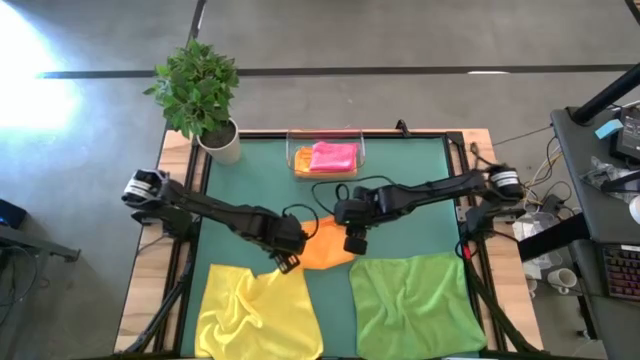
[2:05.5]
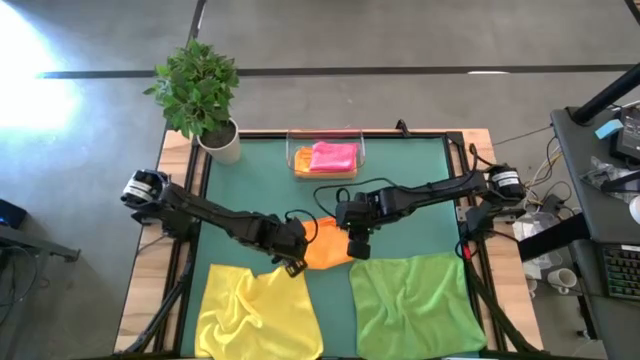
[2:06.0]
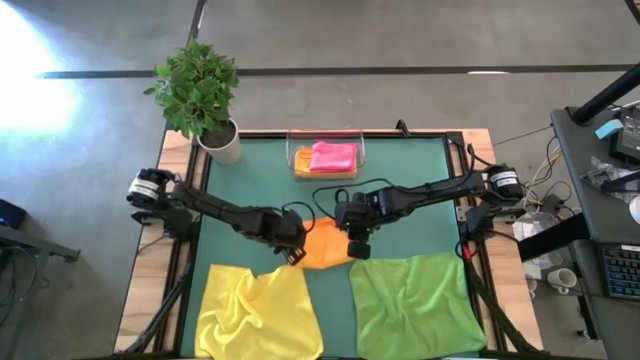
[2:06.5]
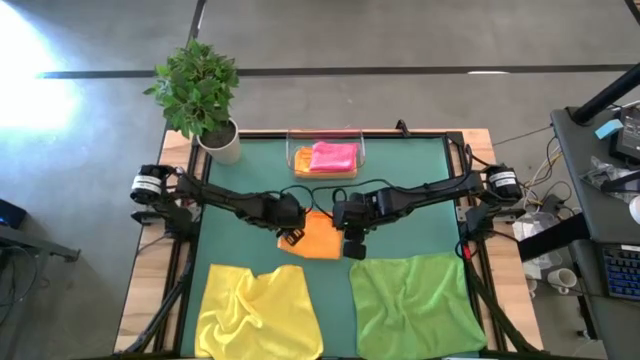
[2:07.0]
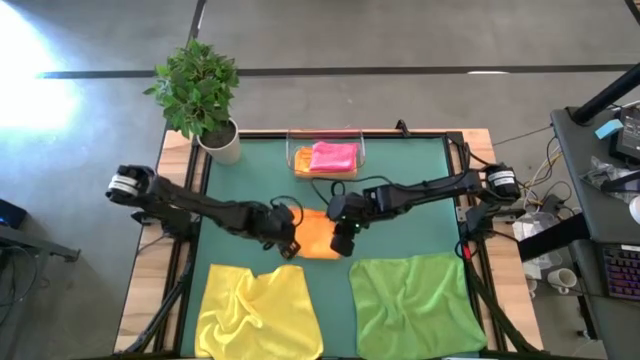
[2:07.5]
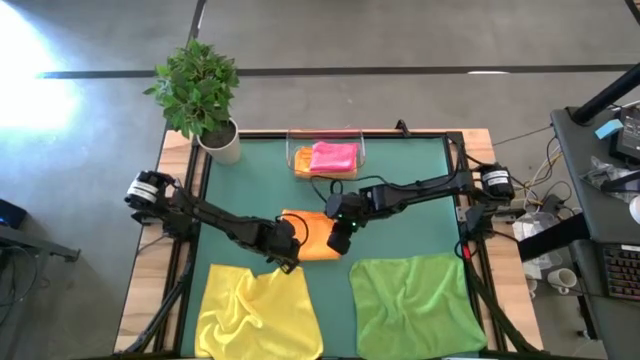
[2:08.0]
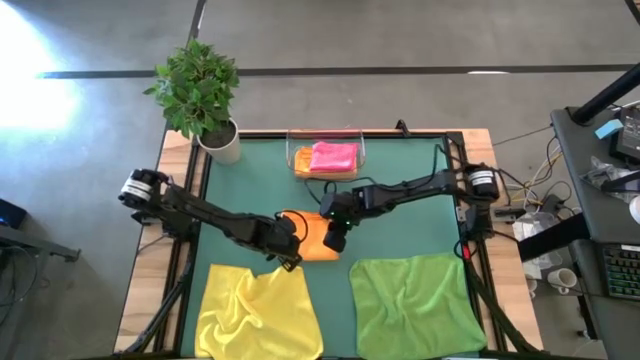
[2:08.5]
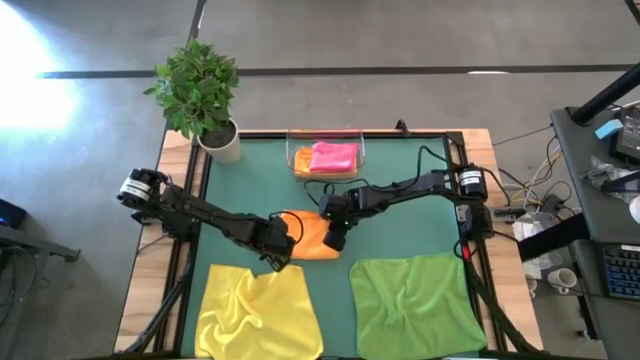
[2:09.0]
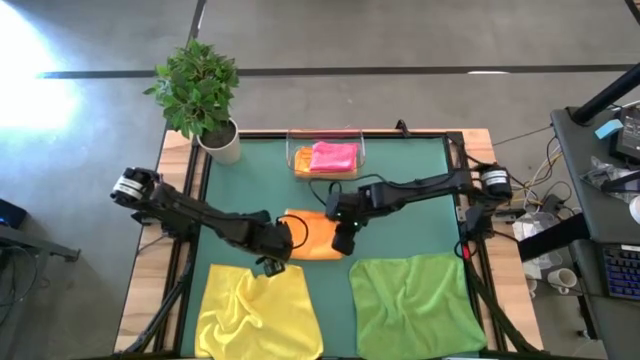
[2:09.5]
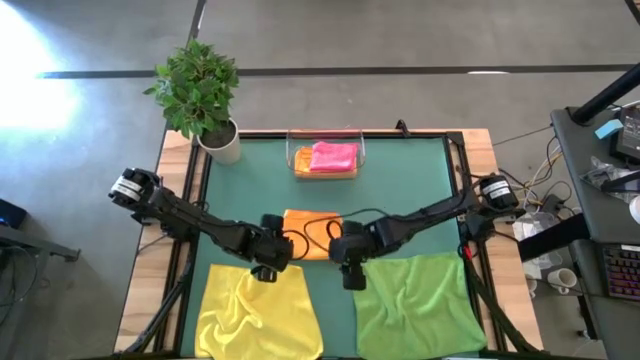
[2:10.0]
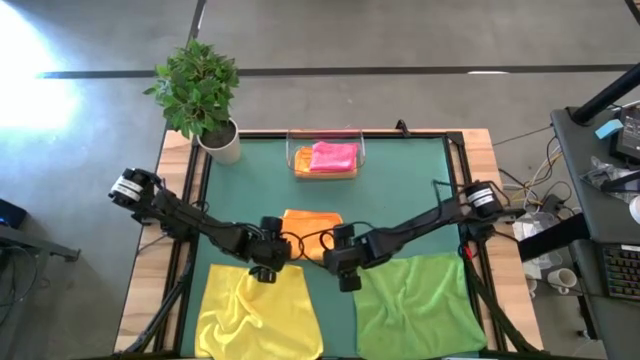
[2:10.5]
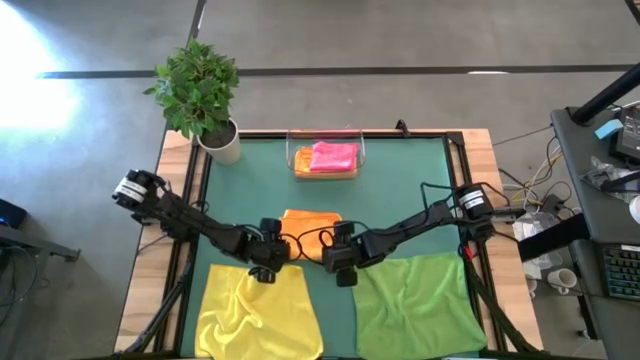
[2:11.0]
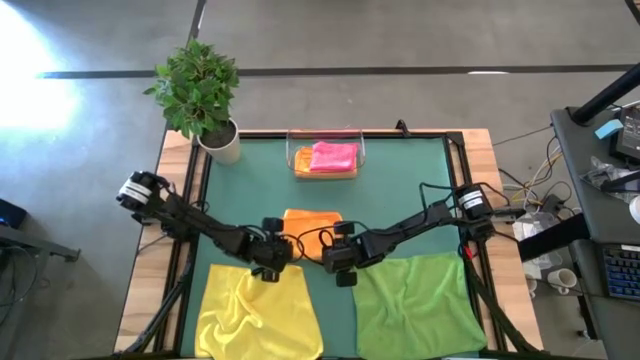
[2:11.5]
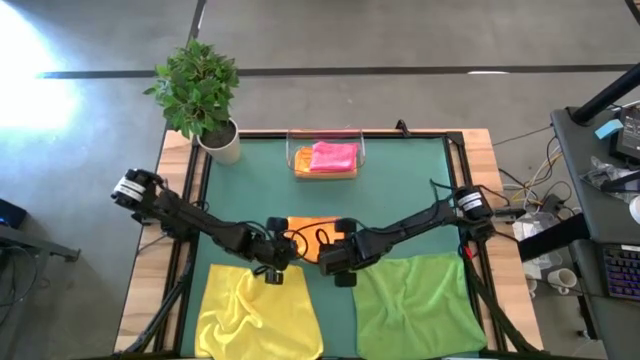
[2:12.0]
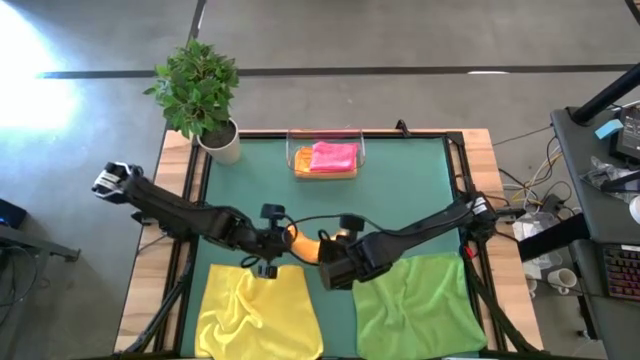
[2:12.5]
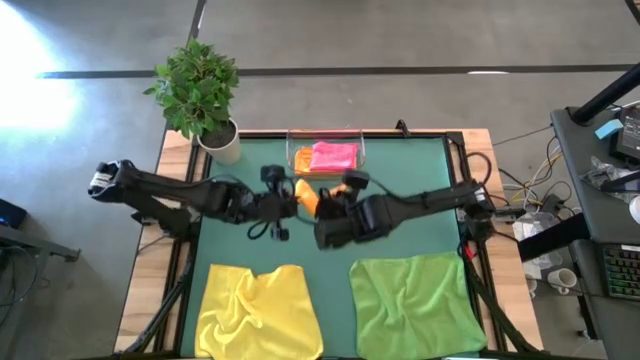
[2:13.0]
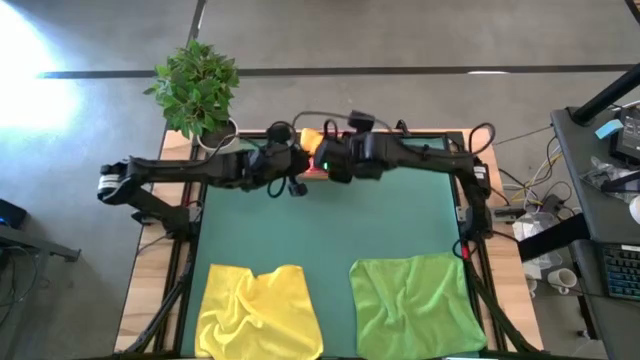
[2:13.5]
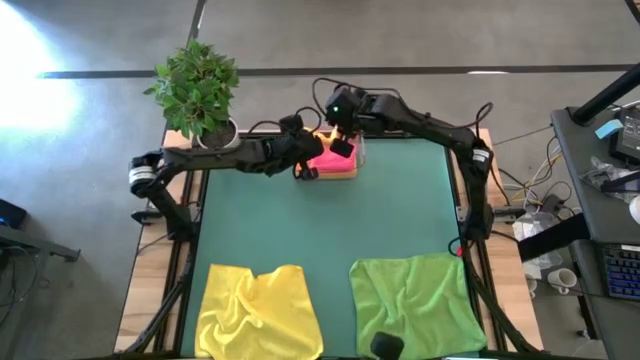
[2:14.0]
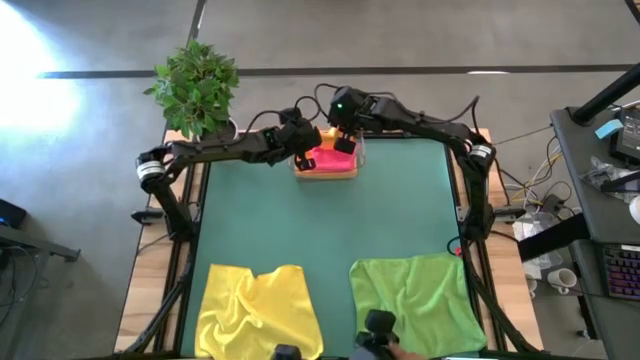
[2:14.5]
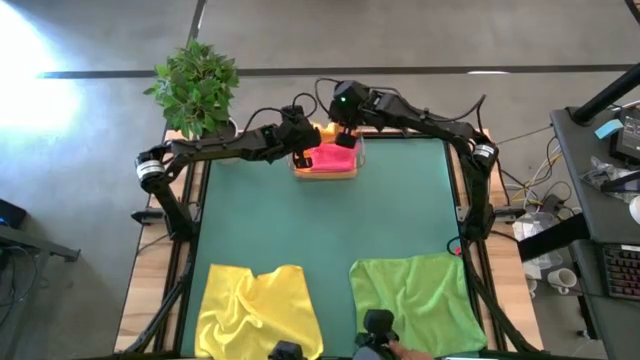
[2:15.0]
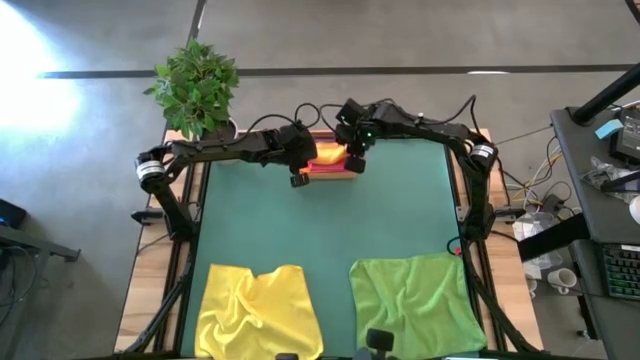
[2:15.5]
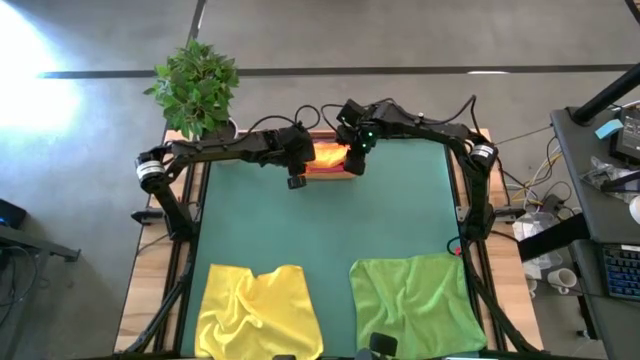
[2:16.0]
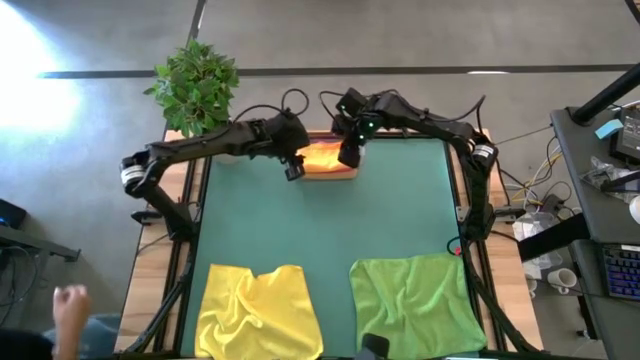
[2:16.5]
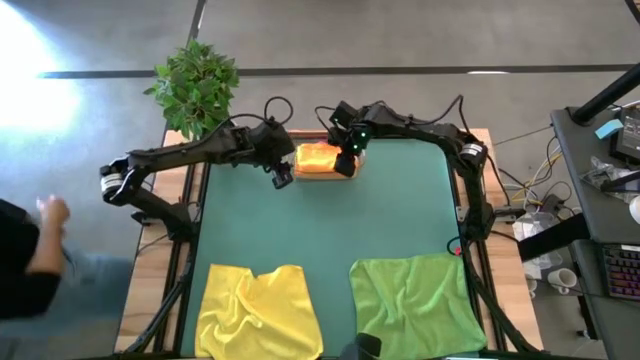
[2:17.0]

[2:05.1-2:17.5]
Task: Fold microfiber towels
Put the orange microfiber cloth into the bin

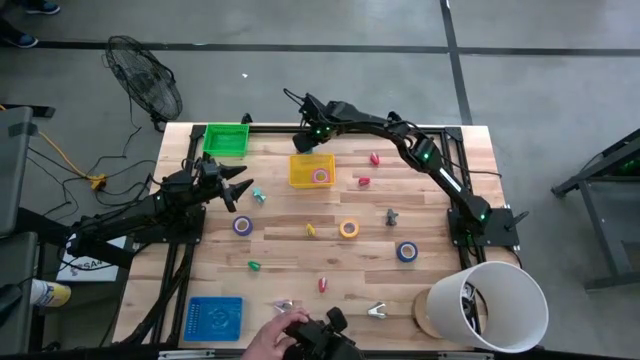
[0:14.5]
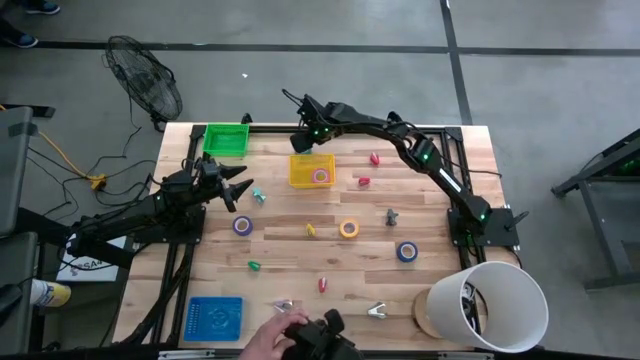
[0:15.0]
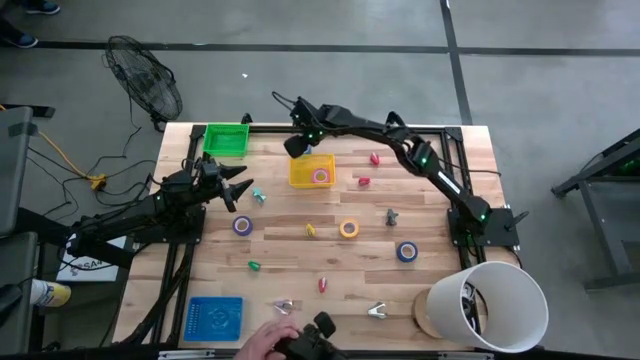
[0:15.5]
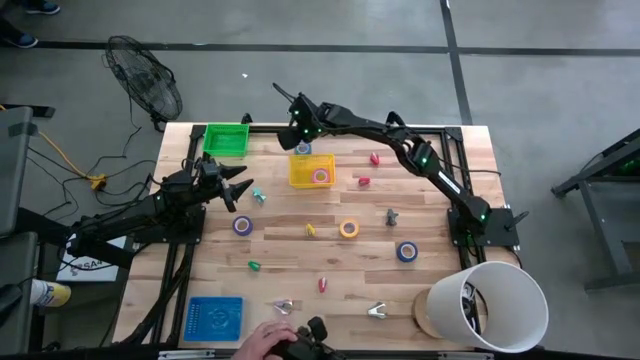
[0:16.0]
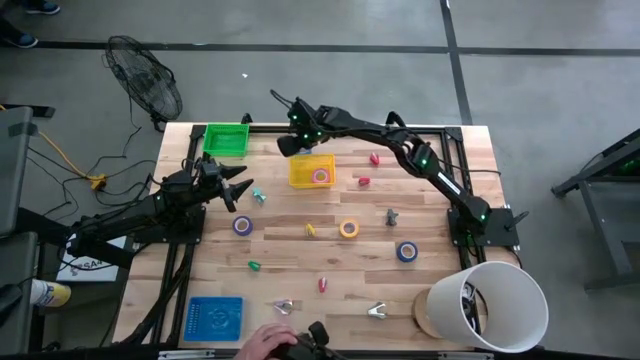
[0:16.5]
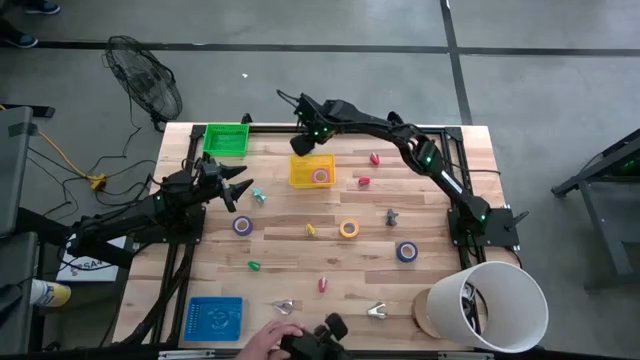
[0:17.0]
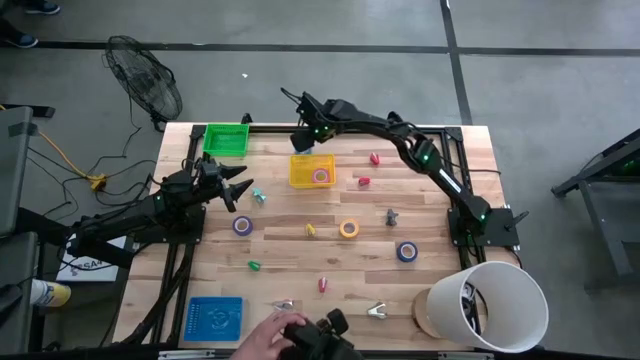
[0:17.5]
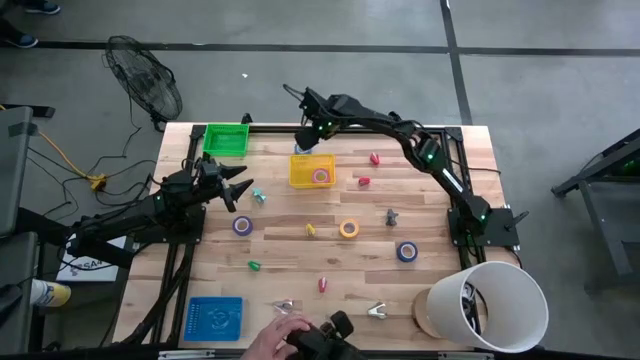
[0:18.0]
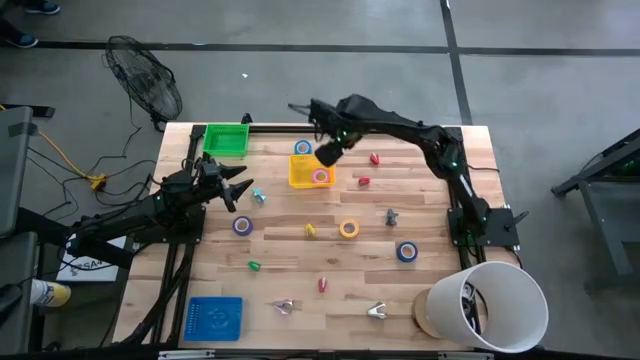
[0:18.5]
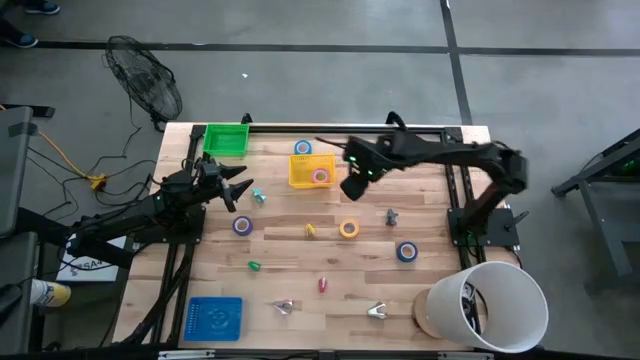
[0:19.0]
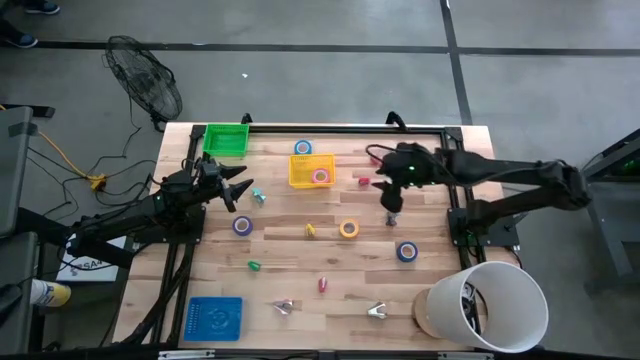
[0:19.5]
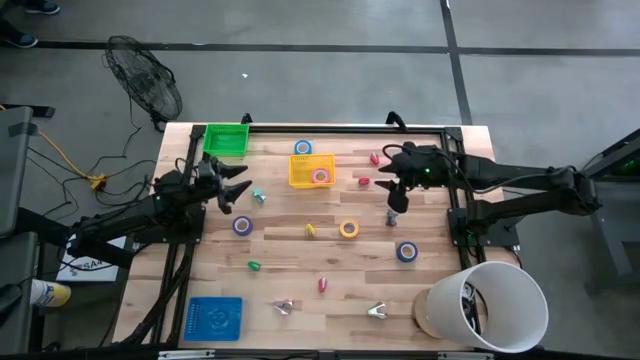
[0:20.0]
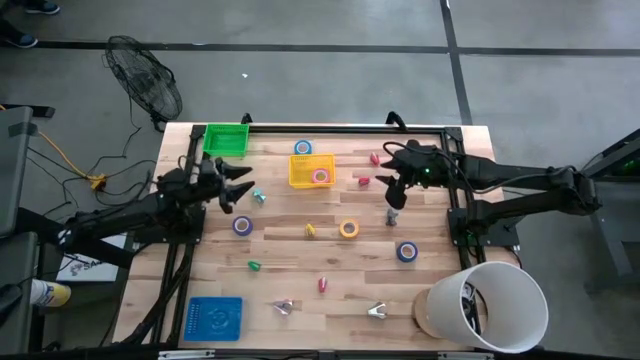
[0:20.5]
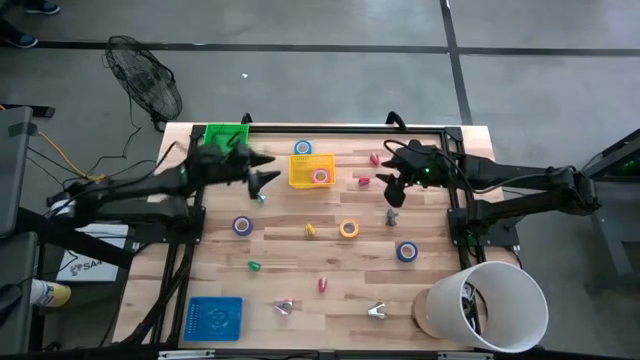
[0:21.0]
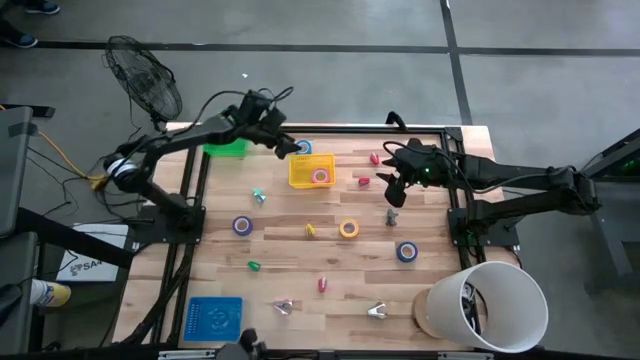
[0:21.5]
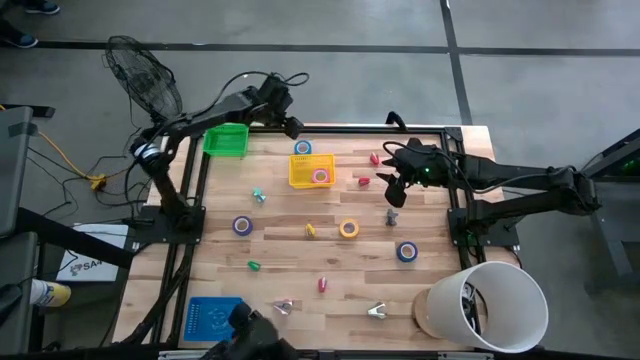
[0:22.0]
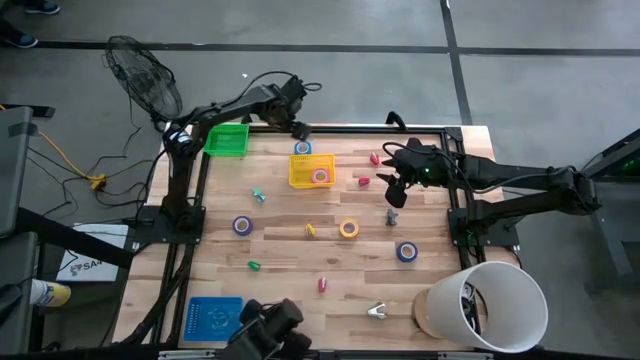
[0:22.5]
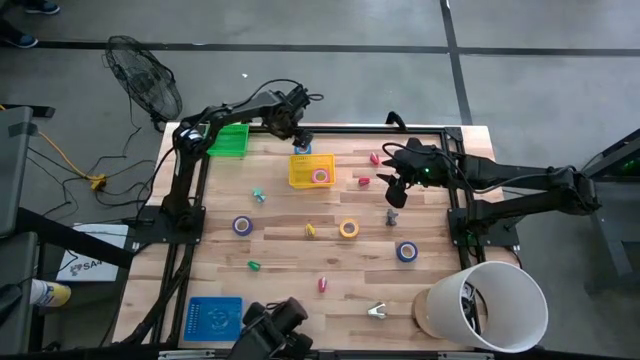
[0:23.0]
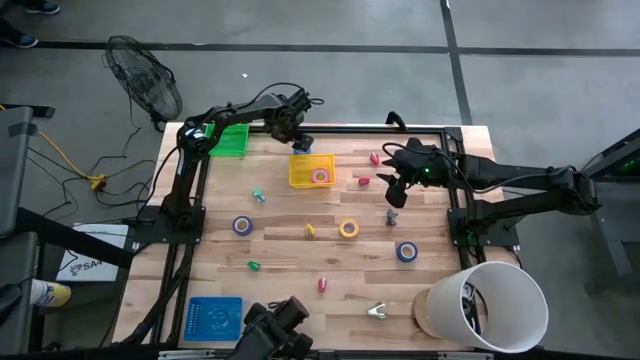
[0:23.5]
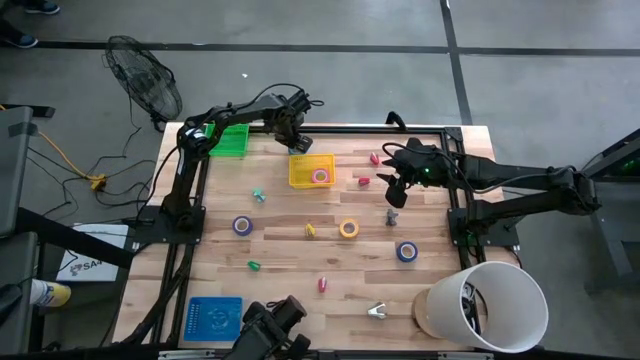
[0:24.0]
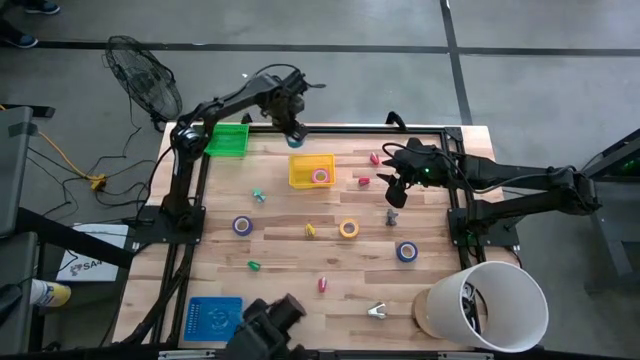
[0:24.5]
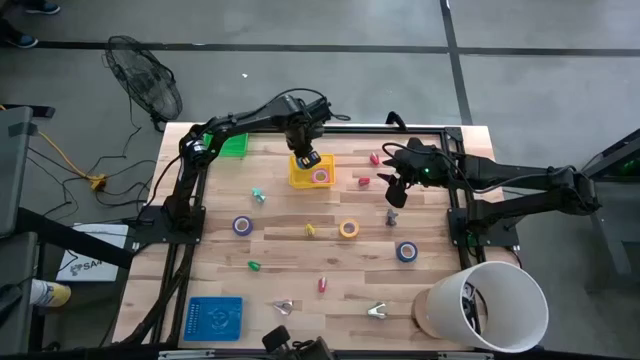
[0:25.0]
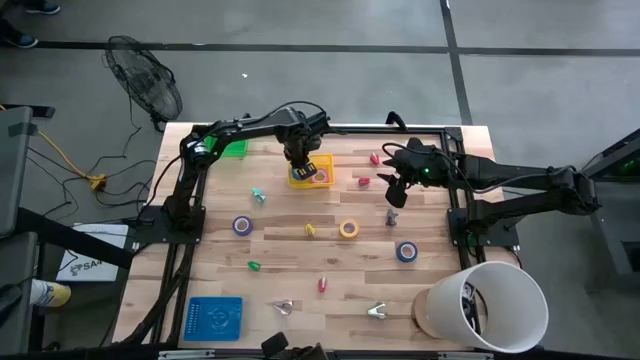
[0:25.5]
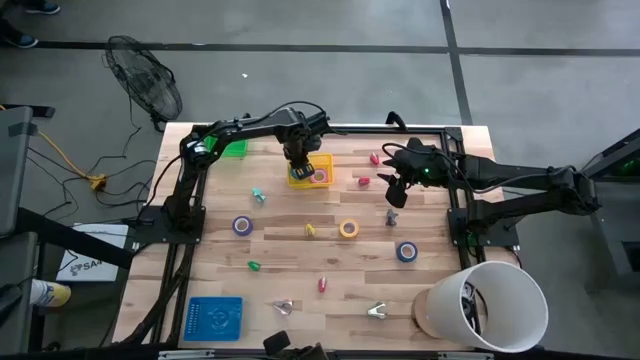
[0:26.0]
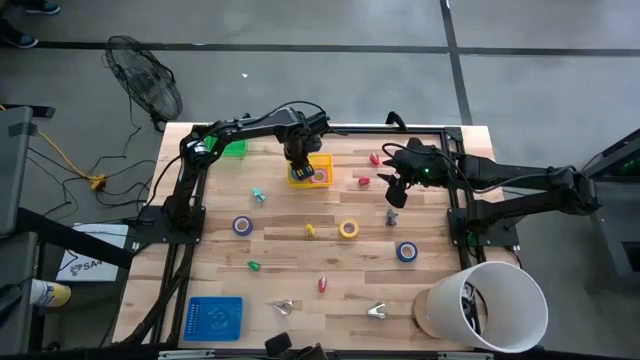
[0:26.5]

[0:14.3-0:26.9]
Task: Pick and place Stapler, Stapler remover, tape
Put the blue tape into the yellow bin
